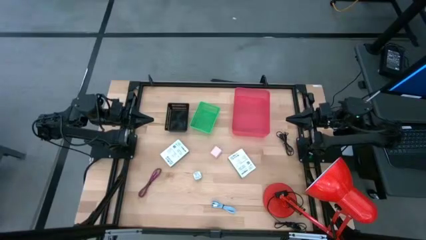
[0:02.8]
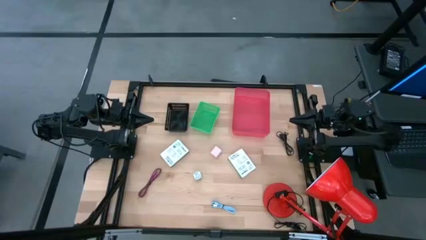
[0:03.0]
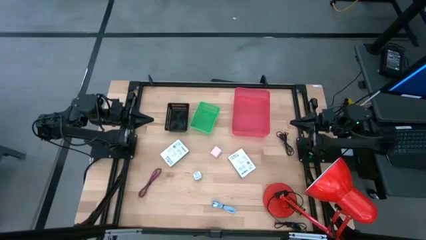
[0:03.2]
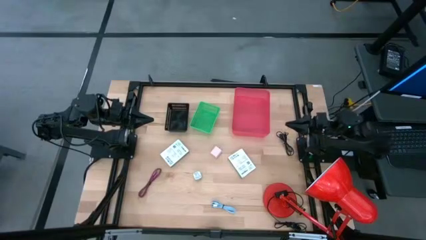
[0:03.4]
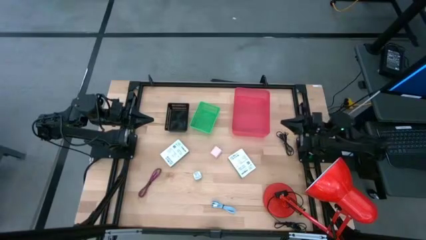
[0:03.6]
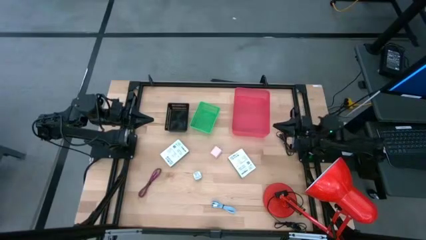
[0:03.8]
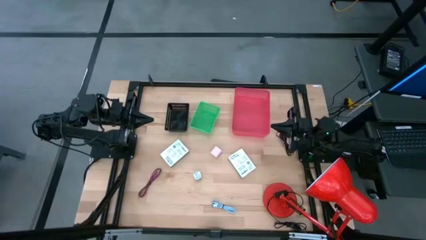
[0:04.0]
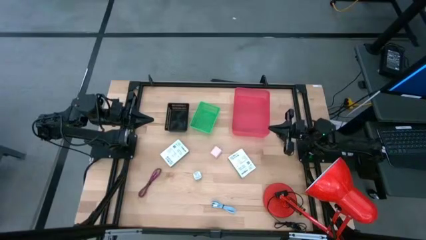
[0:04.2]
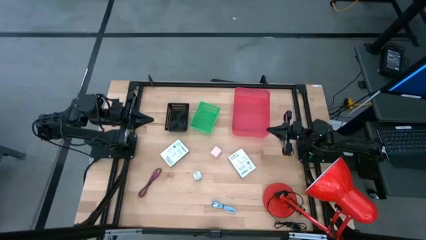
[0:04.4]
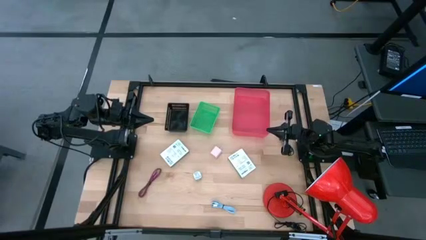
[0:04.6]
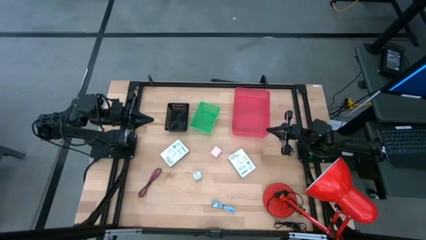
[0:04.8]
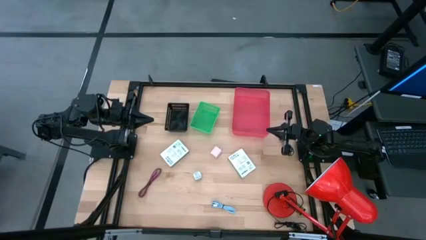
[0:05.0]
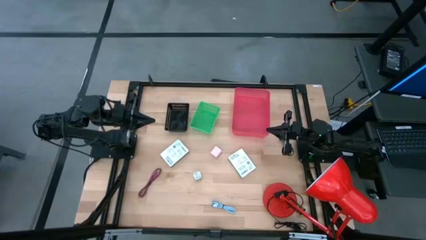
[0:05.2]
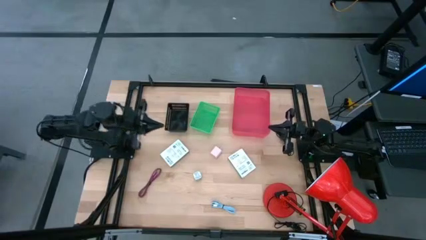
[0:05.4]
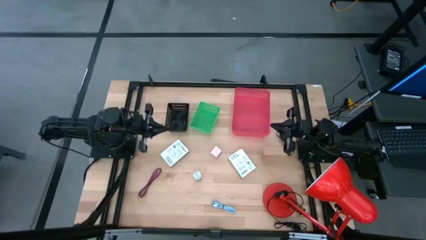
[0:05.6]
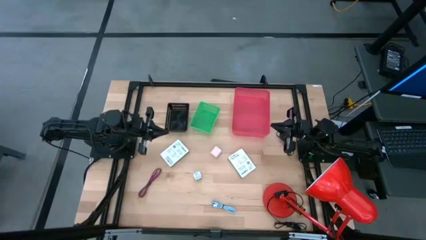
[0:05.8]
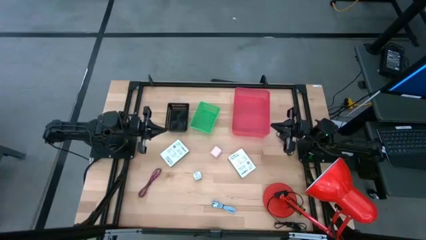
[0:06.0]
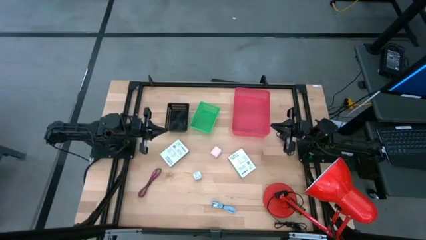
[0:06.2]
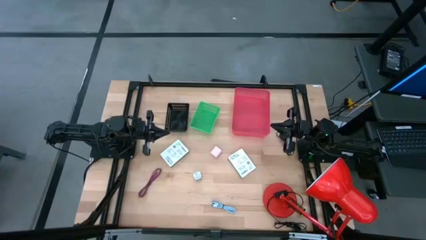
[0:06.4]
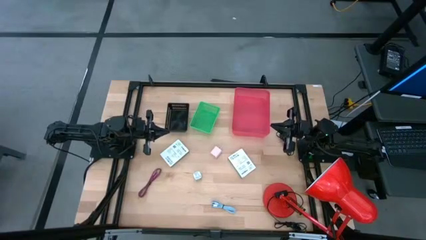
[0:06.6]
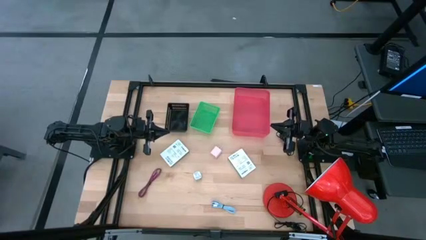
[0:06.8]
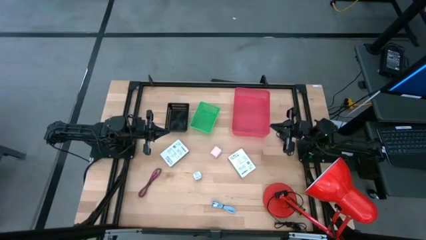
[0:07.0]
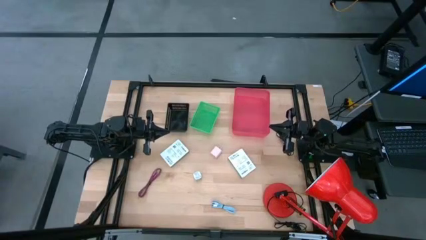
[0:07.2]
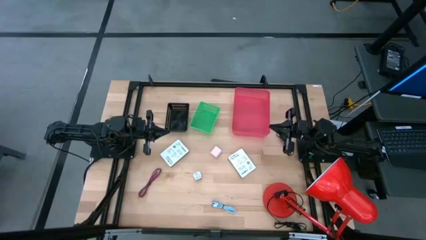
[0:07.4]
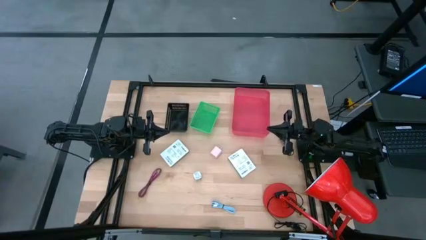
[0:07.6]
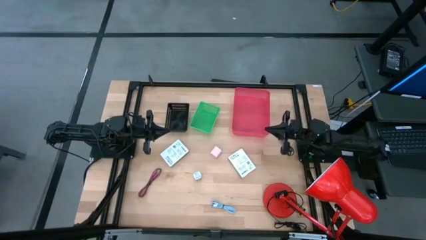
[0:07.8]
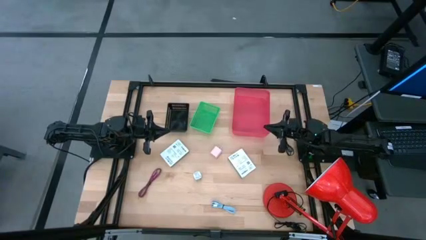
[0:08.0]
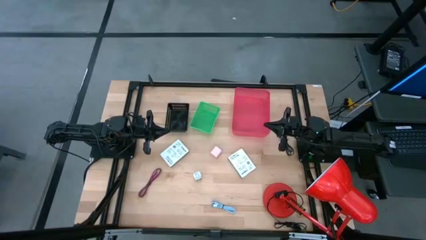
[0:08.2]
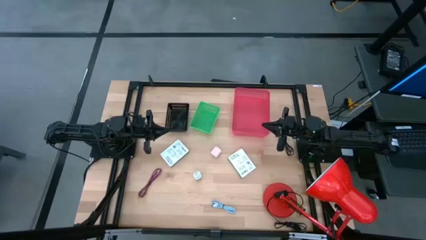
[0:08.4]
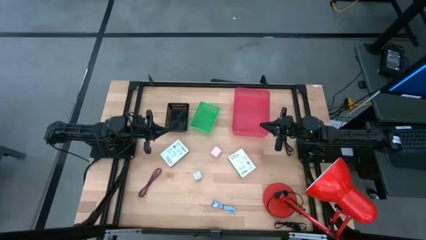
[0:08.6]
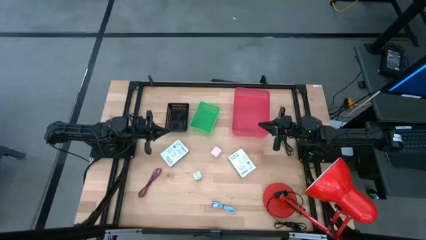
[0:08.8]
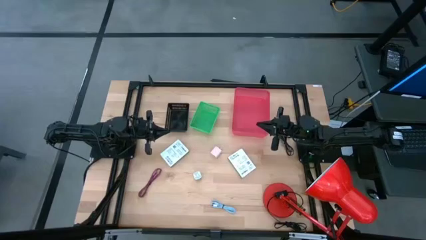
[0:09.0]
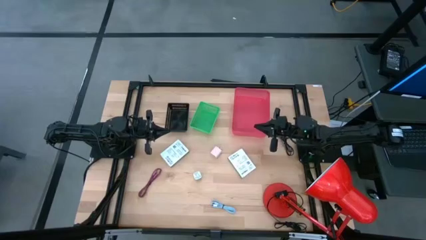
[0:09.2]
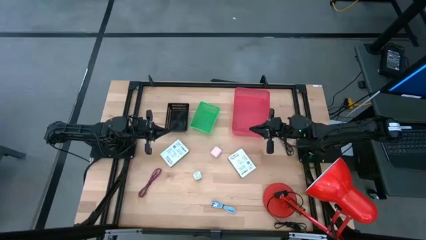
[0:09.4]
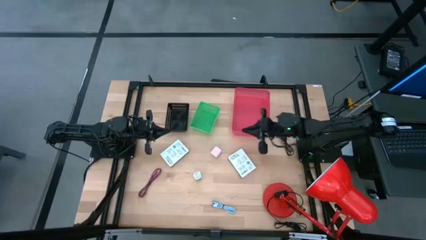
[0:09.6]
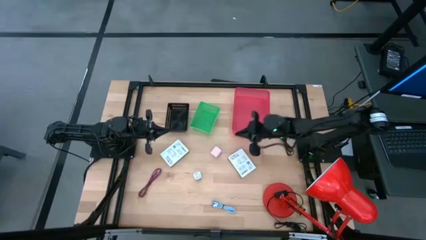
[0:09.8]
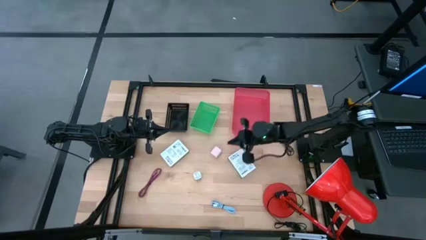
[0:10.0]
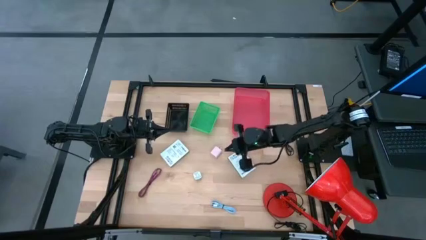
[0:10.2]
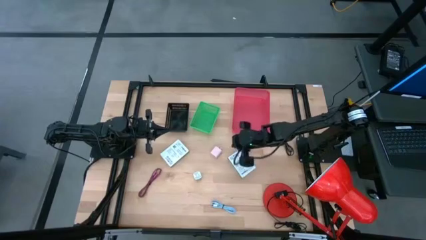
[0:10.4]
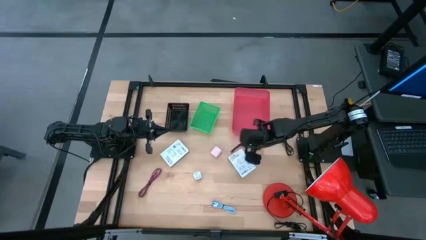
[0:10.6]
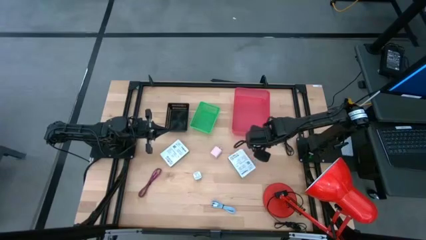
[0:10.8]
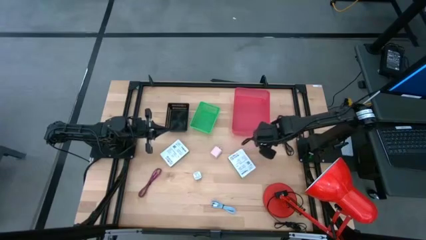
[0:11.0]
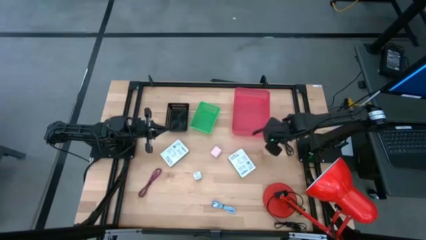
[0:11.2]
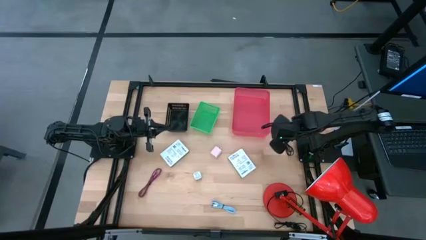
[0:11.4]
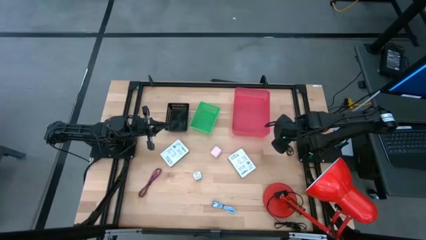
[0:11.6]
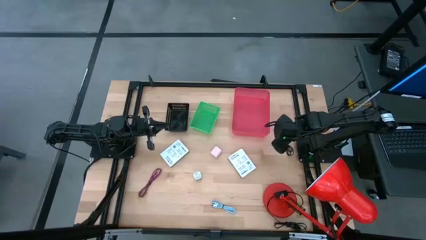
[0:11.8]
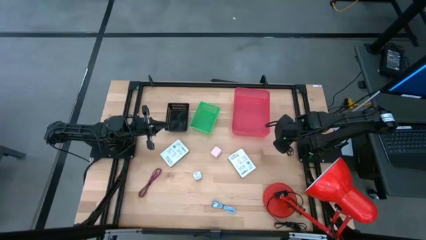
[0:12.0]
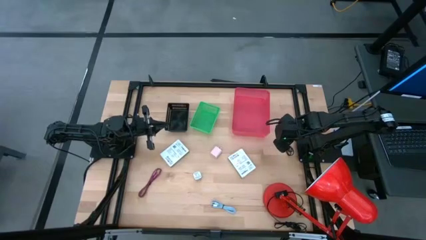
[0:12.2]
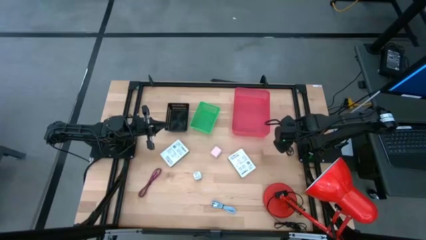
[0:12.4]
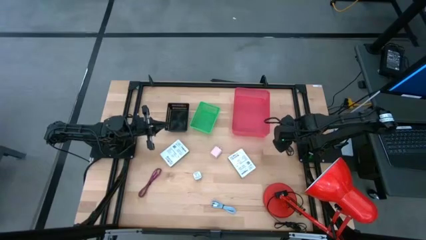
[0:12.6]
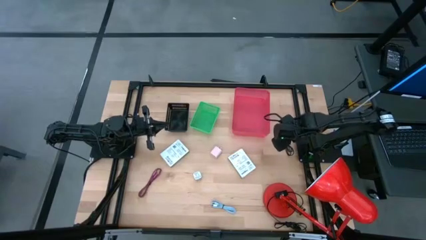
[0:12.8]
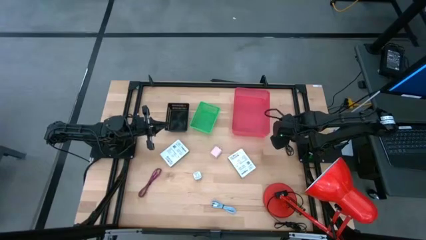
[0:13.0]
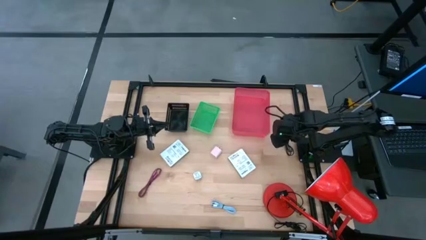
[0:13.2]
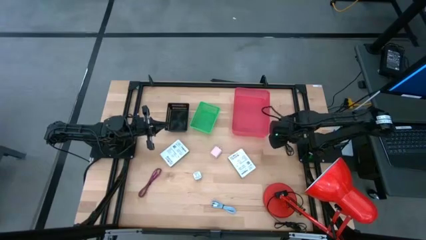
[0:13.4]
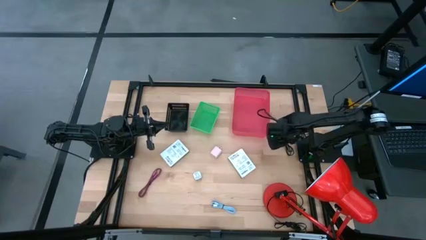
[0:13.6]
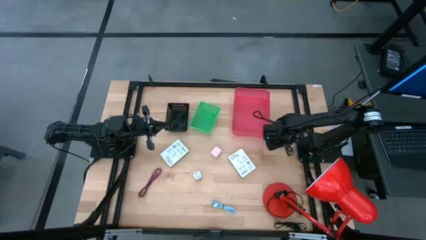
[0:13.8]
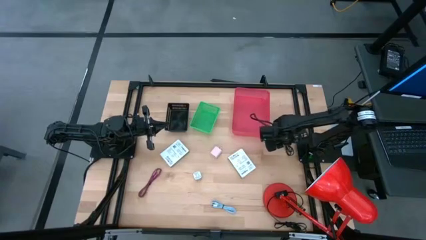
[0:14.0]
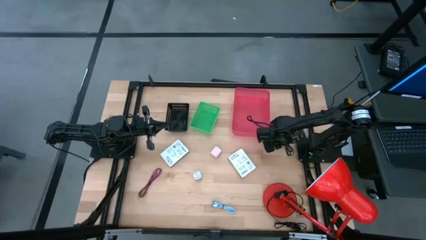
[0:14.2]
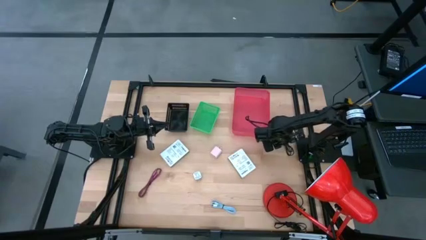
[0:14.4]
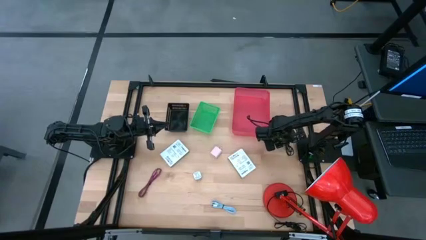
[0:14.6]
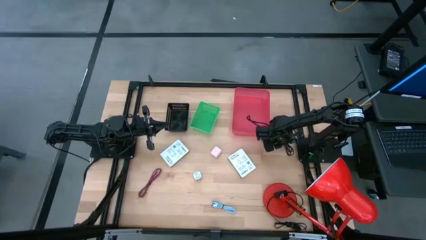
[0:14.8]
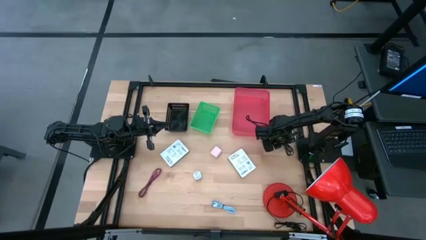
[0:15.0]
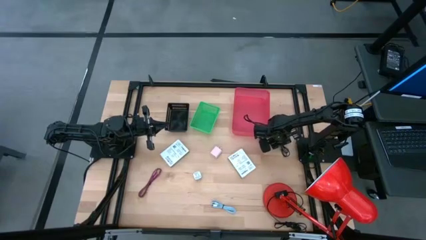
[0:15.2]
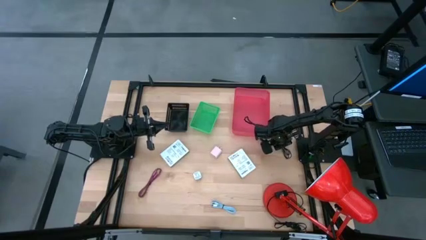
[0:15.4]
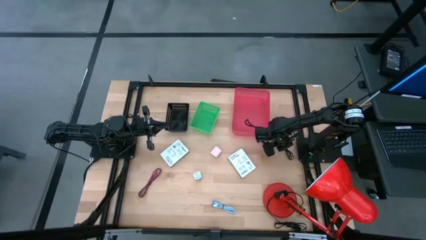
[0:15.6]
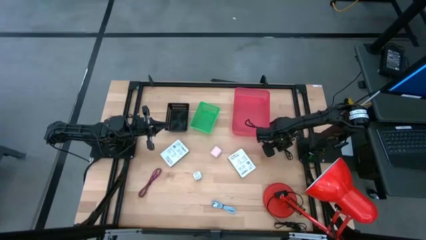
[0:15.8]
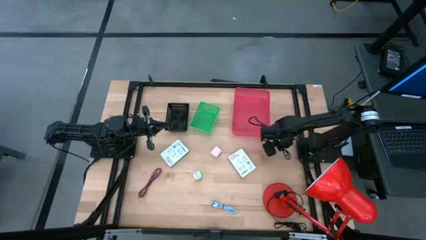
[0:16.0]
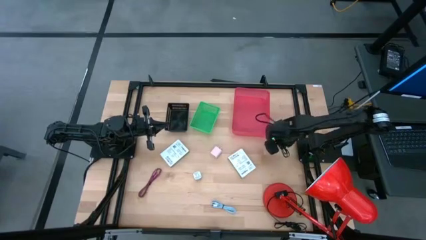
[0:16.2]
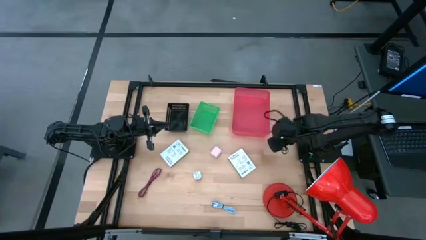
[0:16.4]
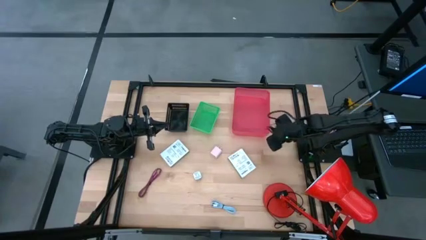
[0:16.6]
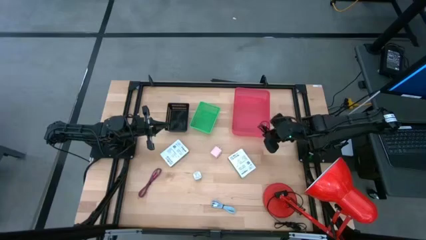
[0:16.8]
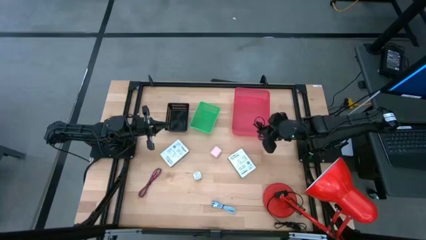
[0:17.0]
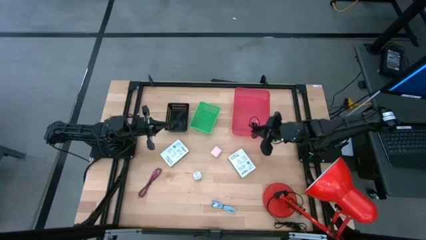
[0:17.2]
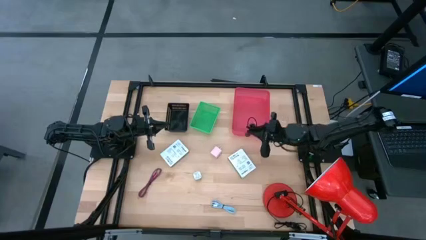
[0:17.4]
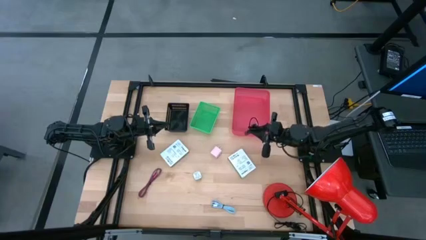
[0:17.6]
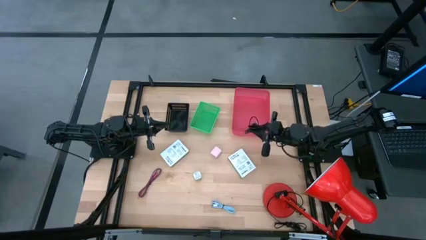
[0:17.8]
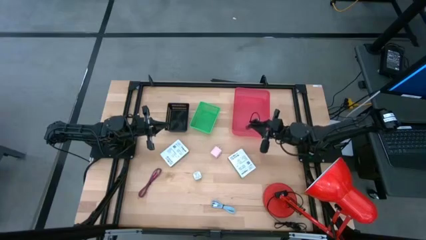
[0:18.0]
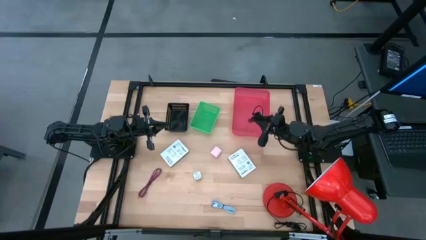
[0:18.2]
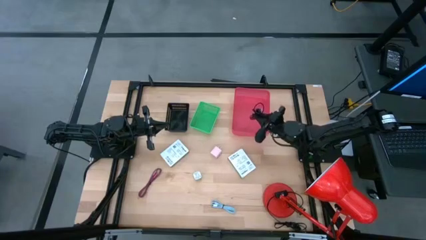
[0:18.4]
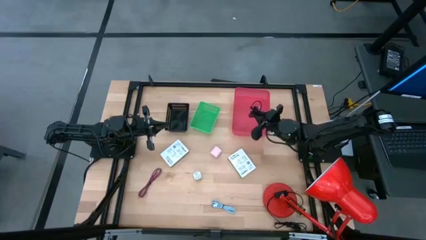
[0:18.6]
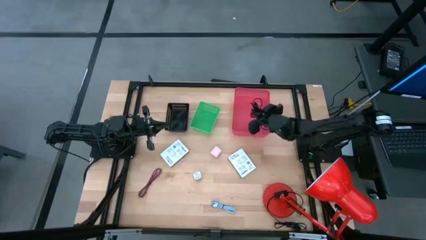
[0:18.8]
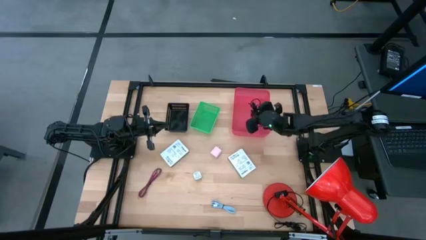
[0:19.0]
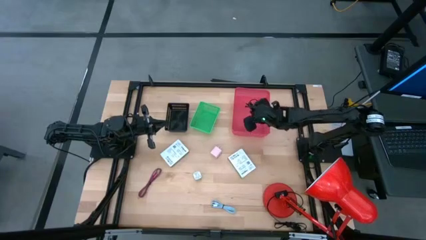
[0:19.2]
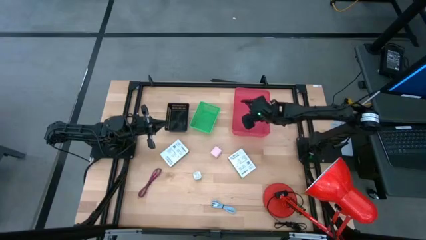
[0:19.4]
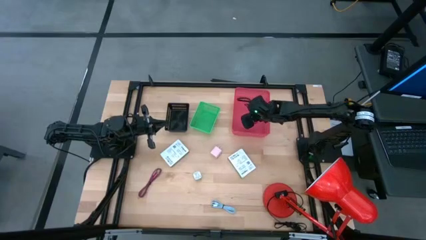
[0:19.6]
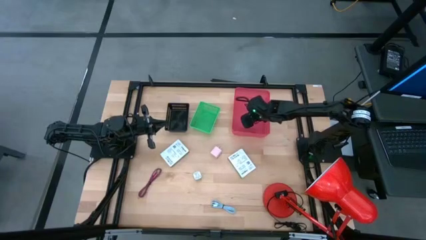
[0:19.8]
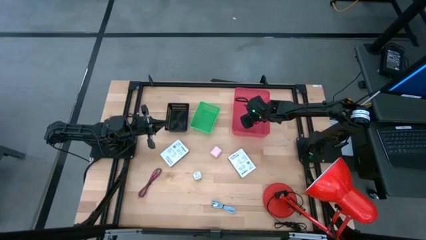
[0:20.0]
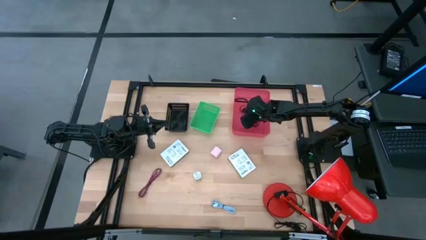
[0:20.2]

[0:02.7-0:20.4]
Task: Pick and place items into bin
Put the black charger cable into the red bin
